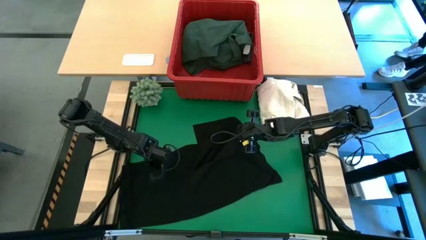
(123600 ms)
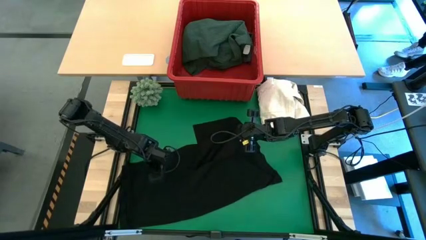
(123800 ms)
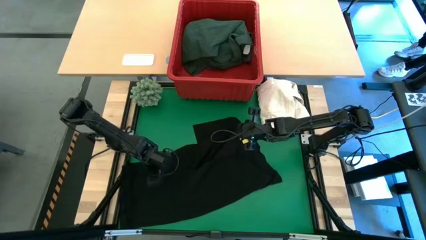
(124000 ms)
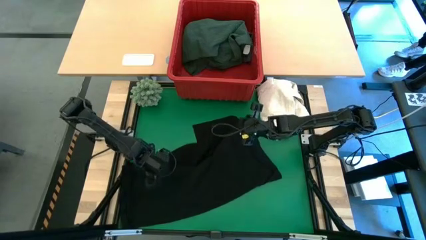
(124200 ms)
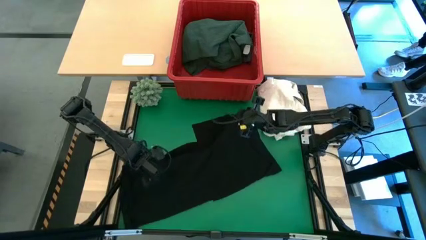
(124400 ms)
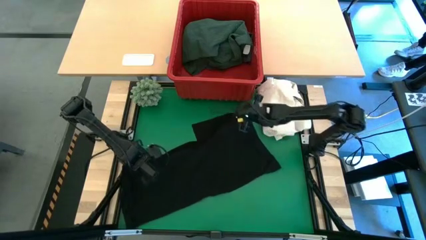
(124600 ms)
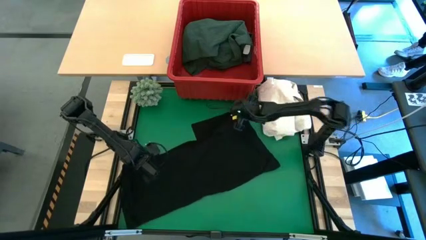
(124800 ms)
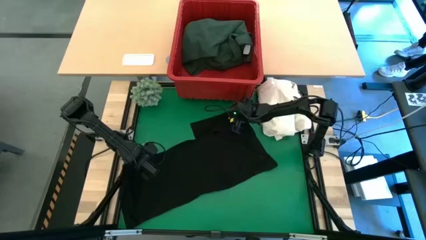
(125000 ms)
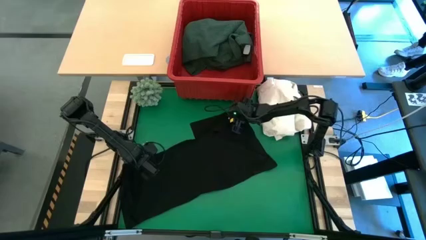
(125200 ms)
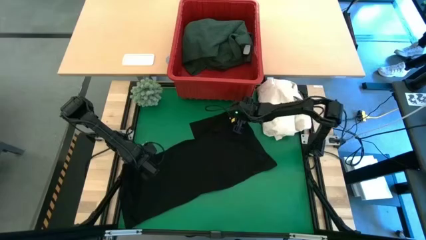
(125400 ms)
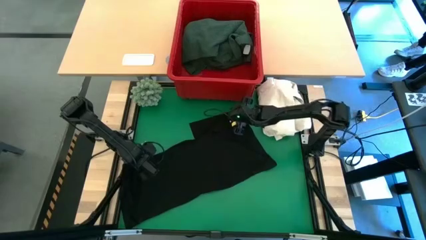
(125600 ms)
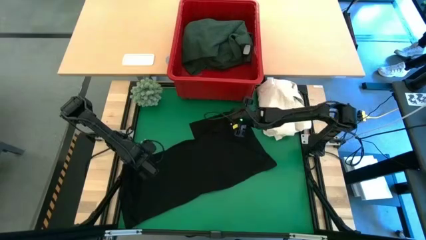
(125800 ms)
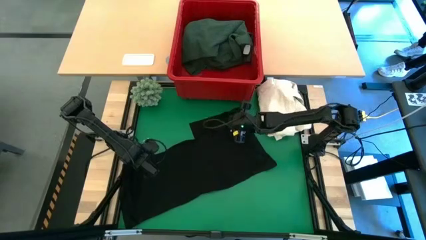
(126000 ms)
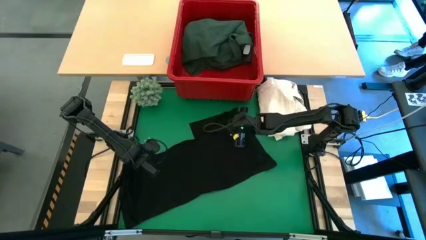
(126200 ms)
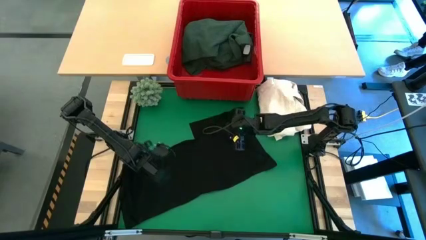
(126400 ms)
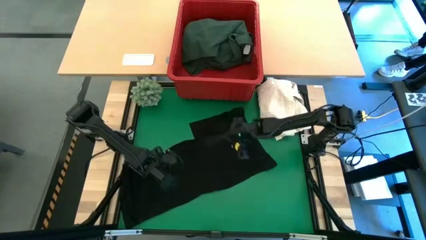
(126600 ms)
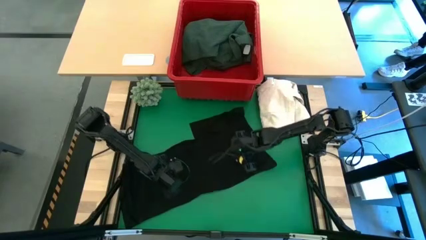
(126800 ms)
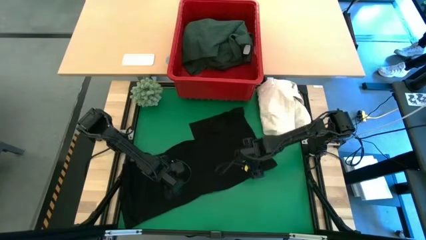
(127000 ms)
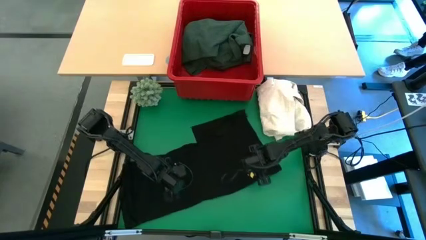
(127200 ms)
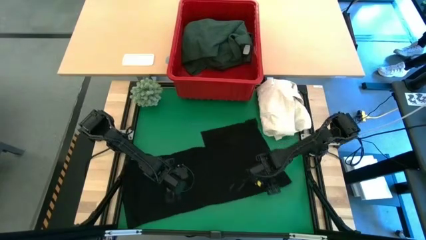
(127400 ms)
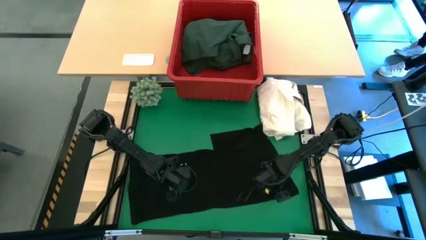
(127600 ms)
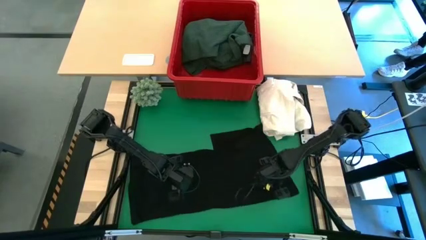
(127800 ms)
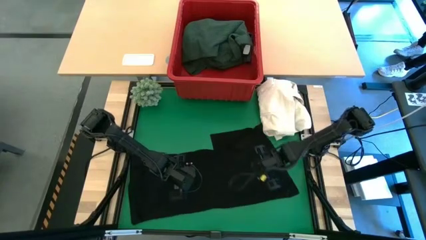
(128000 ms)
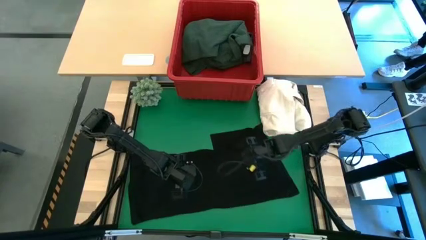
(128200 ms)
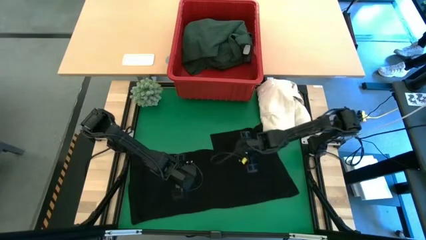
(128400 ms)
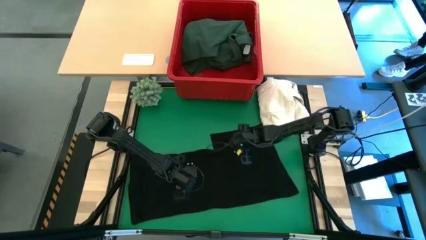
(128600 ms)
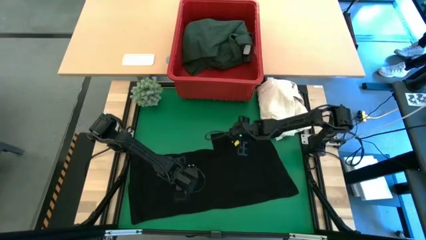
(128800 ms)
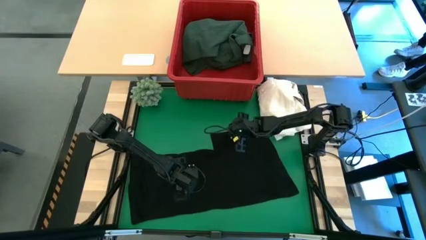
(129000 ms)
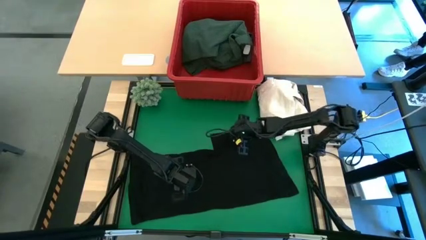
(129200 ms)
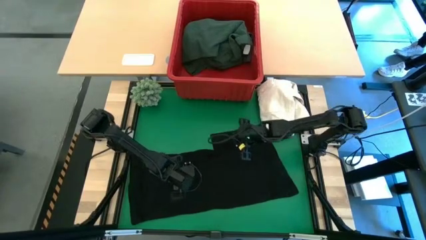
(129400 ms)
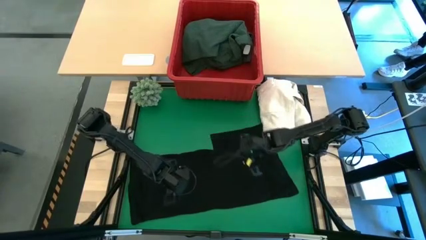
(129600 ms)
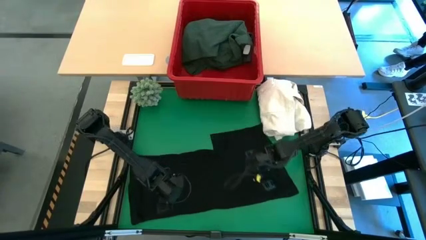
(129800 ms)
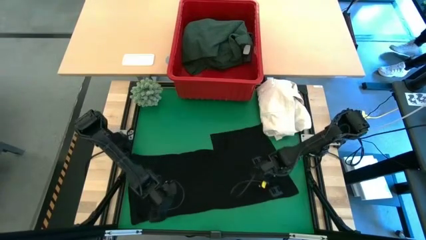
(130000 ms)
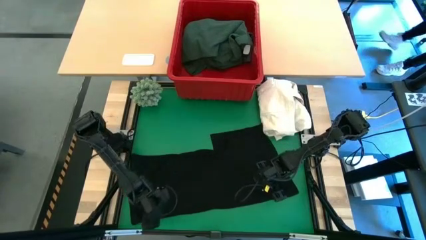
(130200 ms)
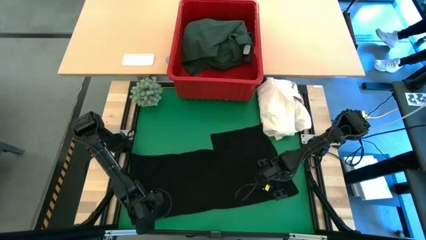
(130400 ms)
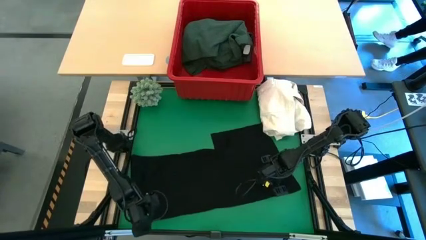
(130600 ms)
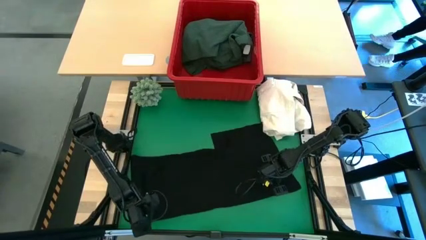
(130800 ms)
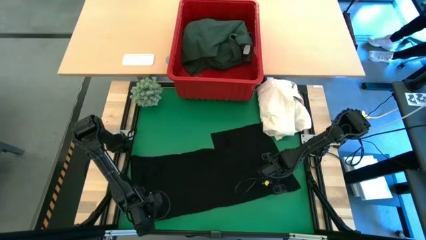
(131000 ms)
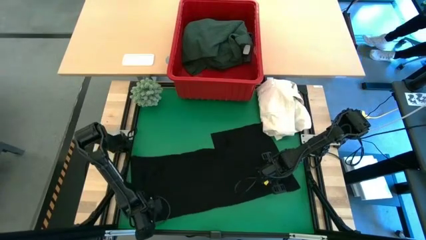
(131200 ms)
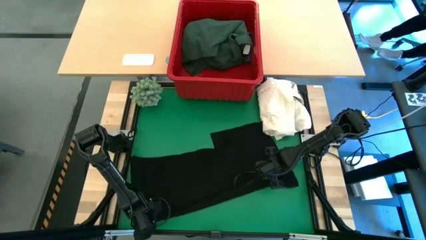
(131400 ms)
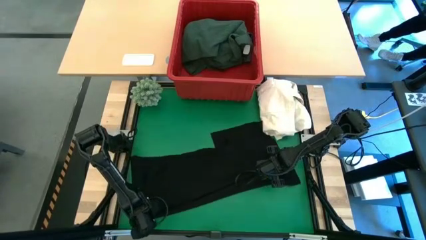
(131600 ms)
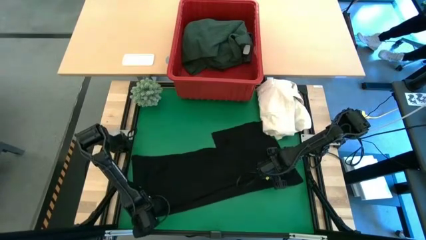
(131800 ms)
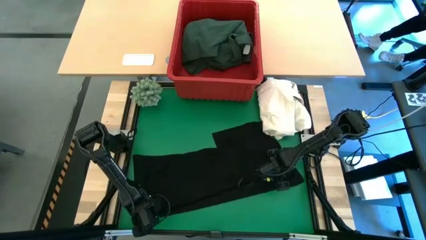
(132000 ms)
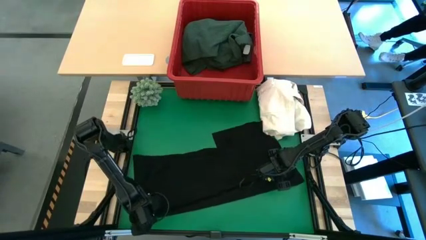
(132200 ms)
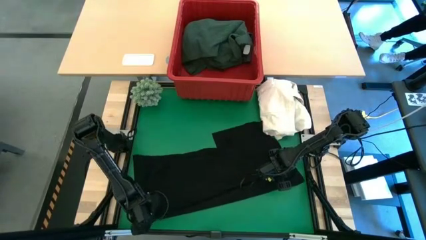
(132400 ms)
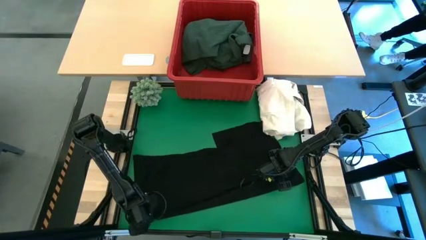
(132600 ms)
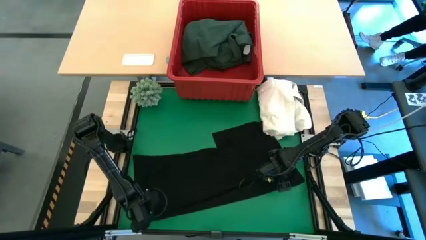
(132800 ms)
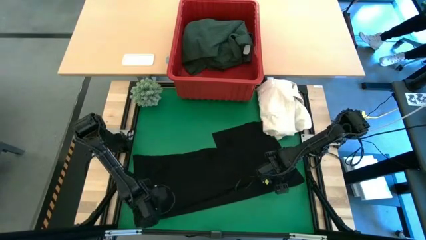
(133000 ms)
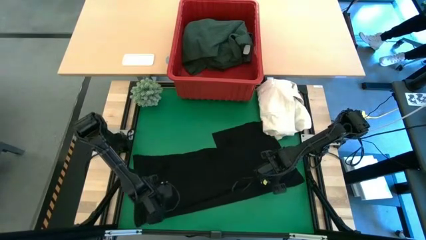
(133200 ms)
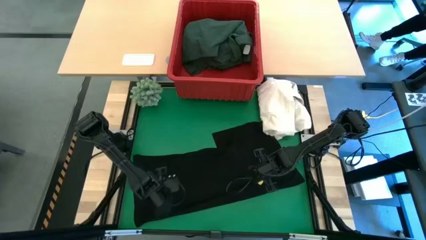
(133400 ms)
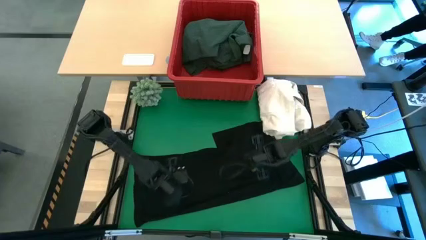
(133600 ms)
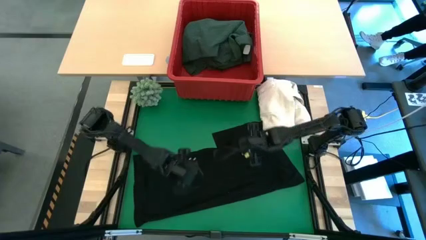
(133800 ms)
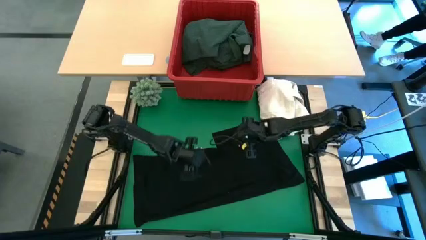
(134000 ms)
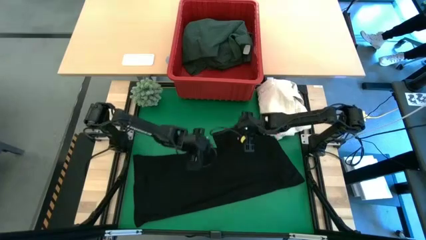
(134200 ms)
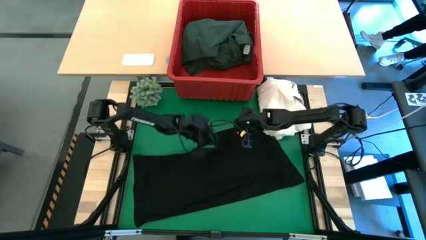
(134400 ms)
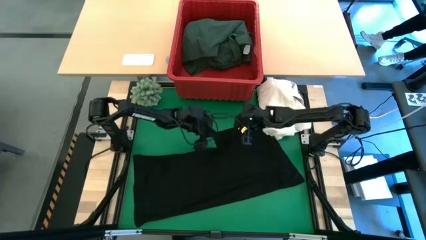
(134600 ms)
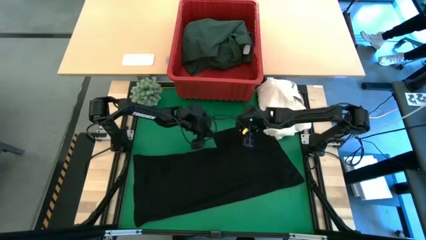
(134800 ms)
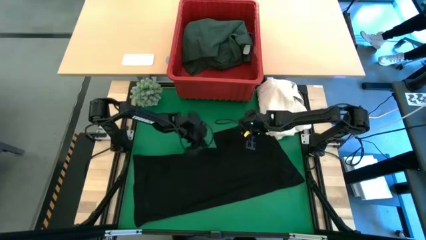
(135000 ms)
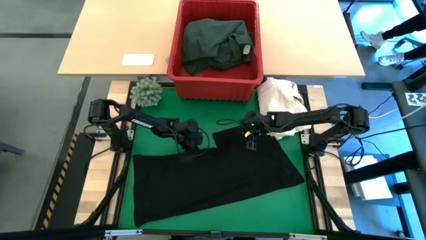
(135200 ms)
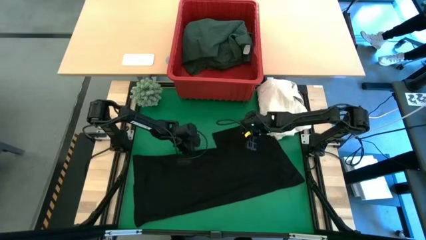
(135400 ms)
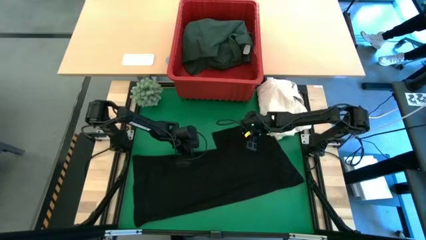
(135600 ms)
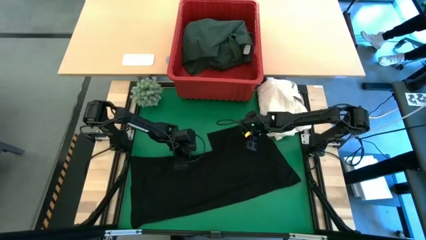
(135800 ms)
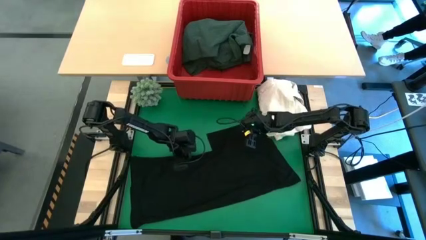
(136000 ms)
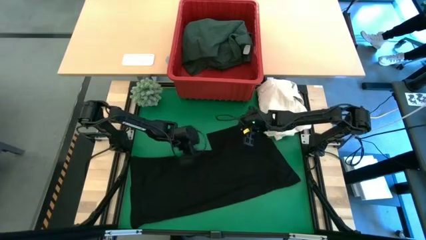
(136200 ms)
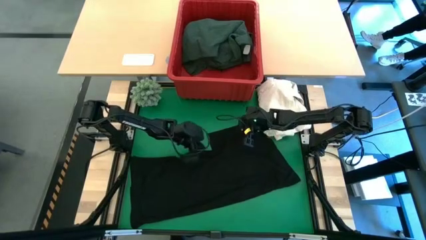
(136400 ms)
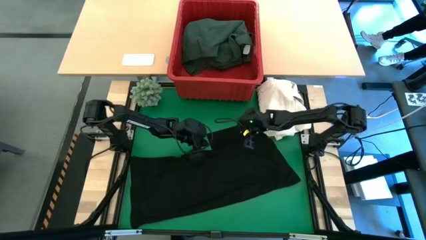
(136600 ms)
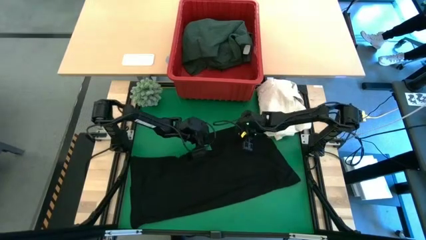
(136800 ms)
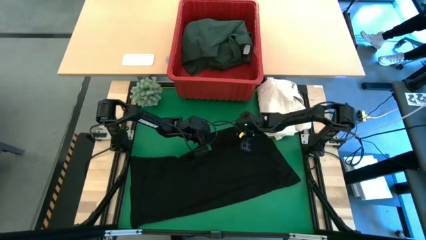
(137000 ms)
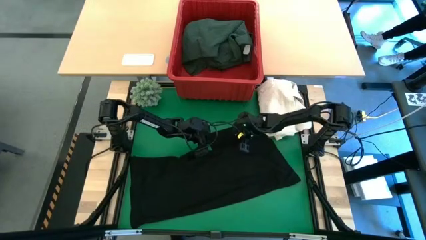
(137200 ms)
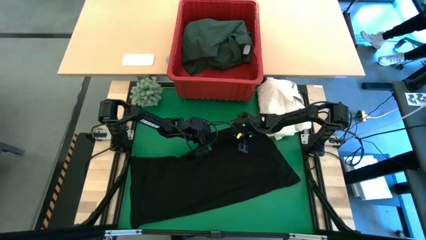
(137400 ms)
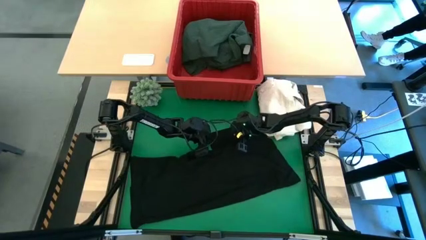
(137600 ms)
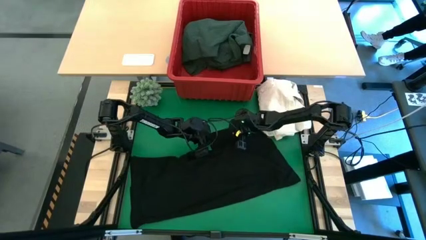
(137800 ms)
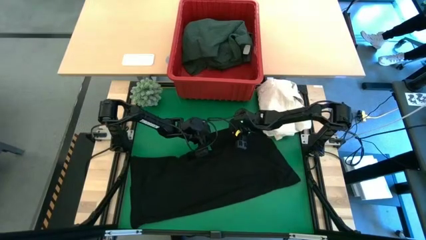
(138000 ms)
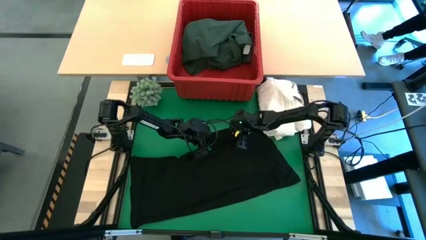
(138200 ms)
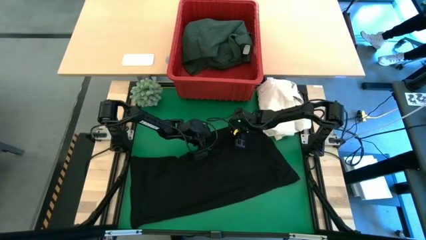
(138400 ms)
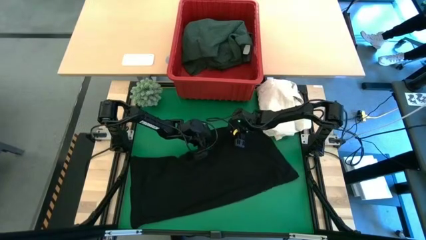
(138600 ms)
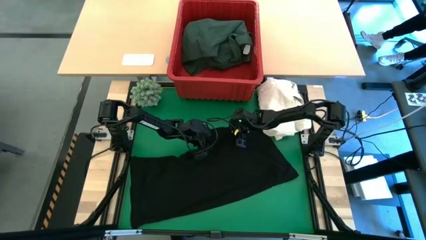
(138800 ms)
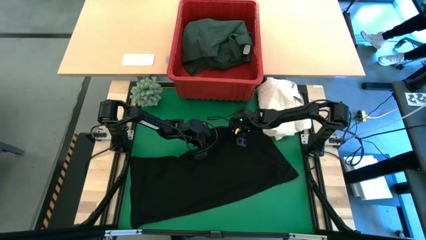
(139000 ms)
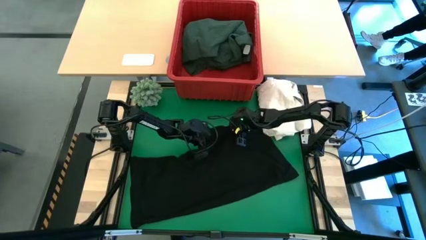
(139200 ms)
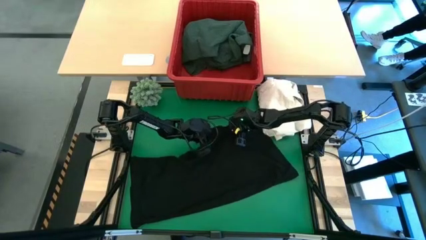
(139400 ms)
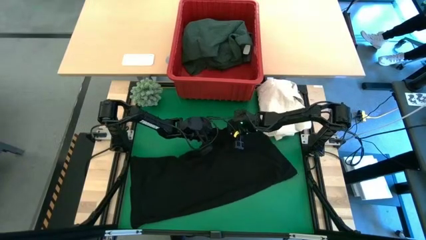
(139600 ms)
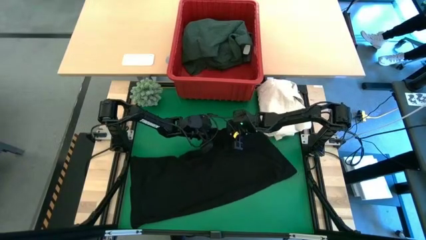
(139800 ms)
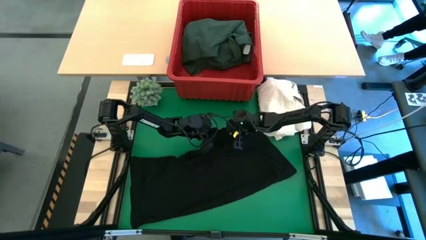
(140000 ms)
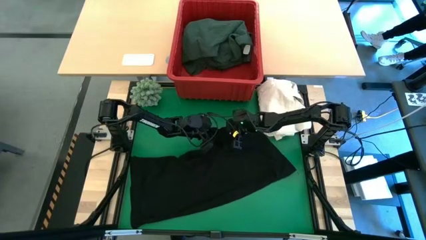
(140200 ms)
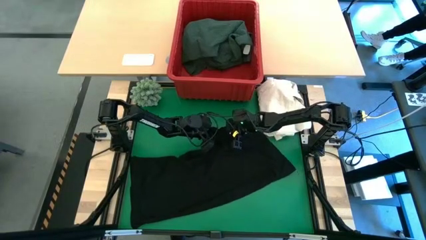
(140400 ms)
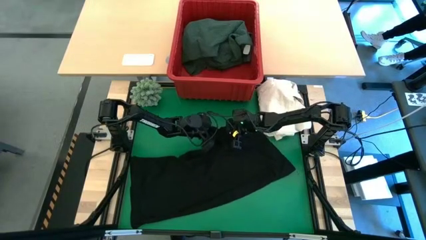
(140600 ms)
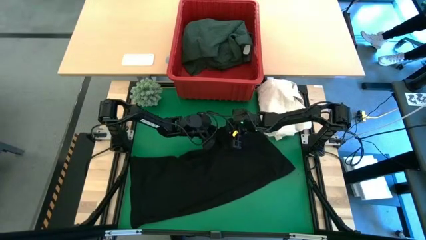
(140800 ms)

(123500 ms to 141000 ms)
Task: Fold laundry
Fold the black shirt
